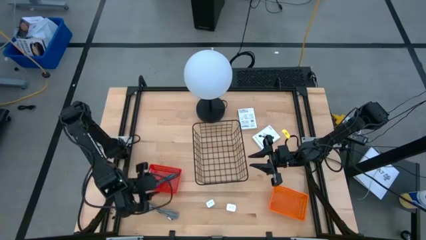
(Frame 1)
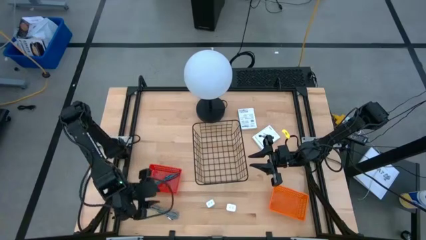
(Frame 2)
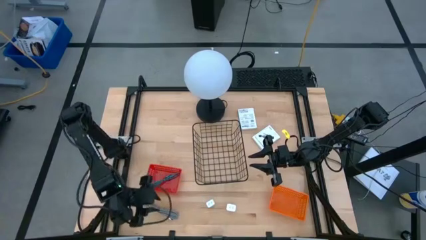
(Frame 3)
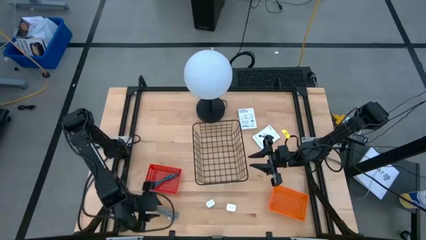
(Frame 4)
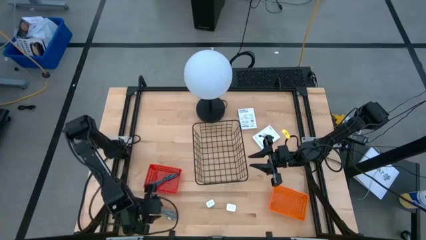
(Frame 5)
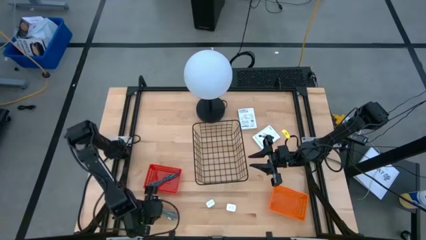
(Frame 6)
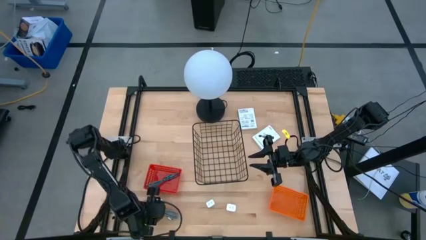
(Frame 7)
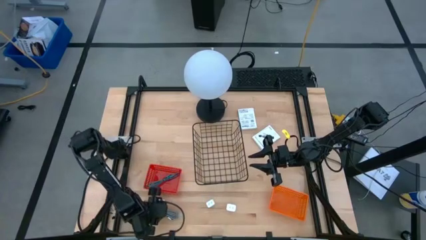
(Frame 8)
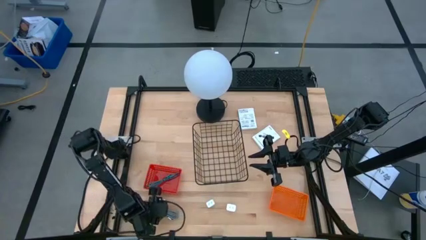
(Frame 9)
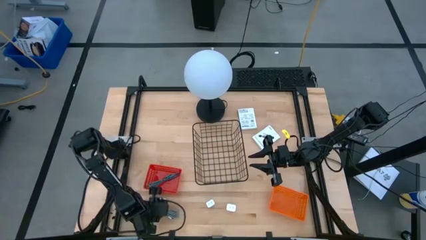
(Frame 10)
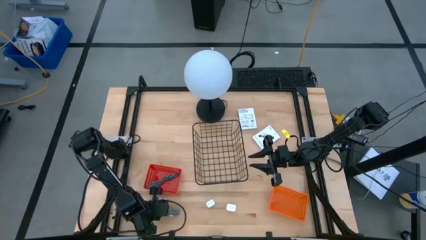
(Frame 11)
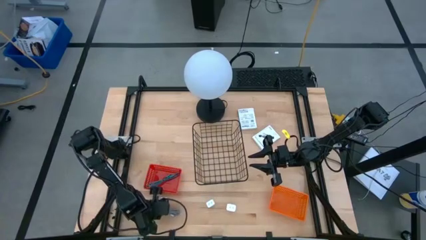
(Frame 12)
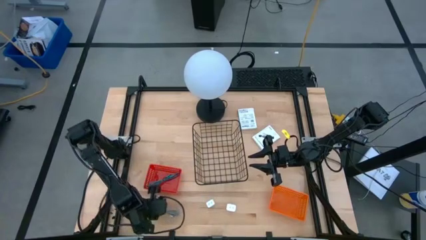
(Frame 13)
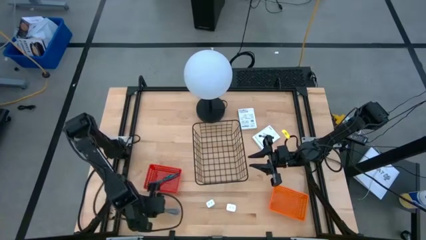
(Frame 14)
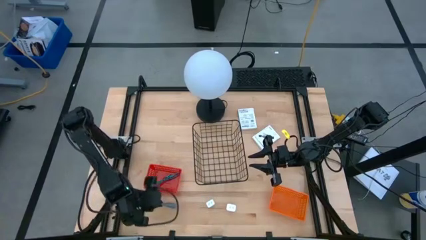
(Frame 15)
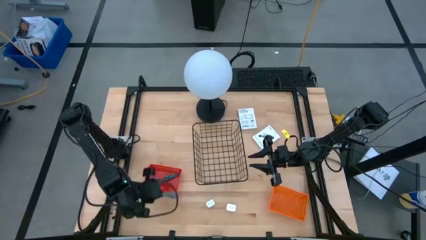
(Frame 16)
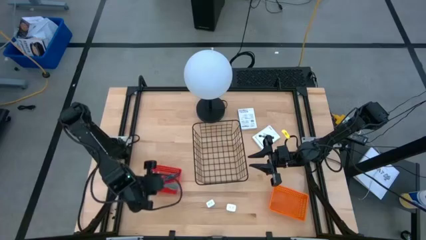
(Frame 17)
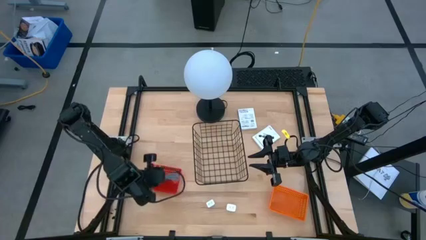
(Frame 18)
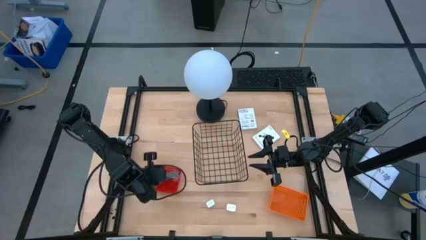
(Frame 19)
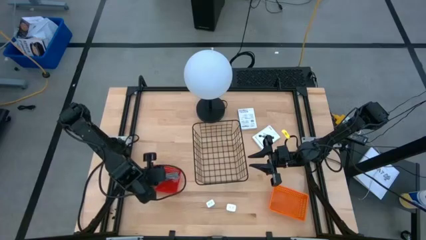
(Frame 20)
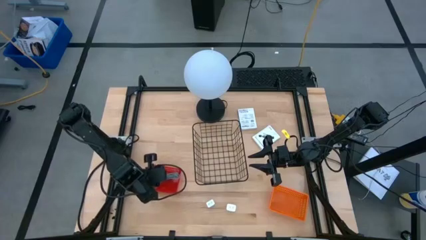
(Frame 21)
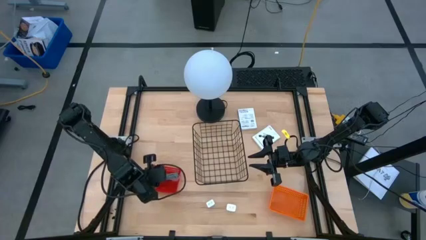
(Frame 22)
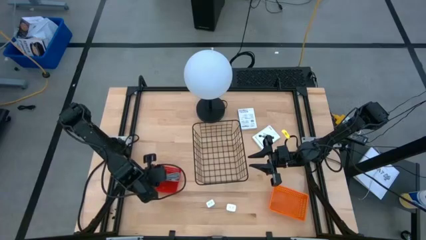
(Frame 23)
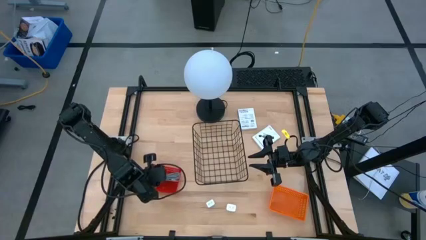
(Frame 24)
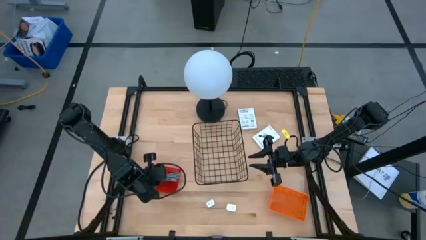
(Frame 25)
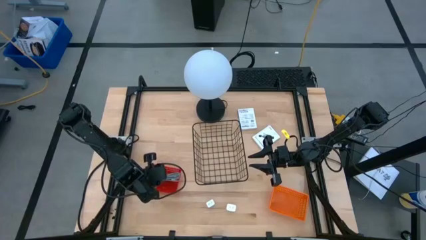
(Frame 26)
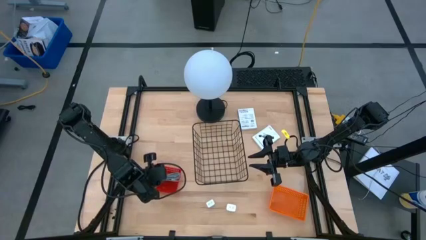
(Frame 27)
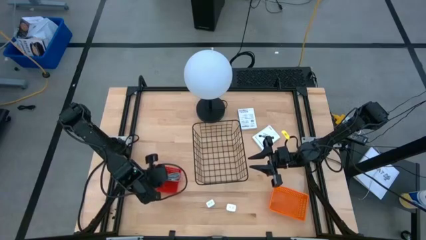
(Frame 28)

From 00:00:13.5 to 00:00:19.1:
Task: Pick and place items into bin
Put the white USB cable wire into the red bin

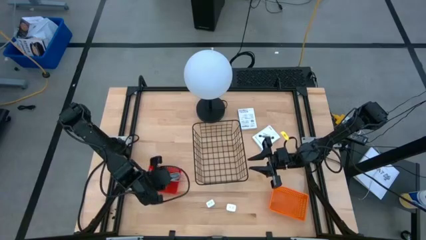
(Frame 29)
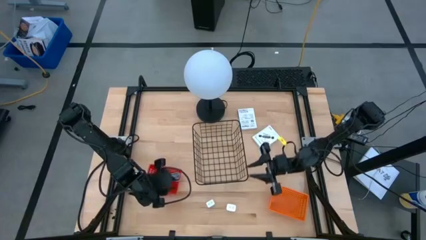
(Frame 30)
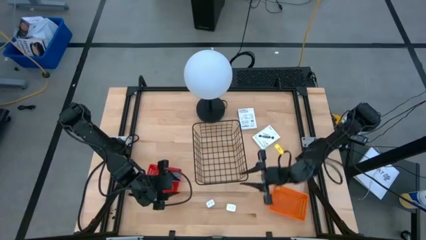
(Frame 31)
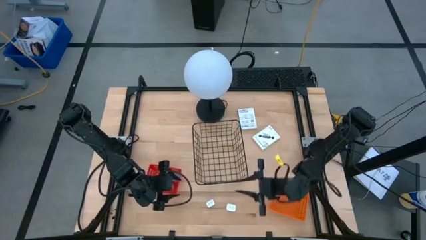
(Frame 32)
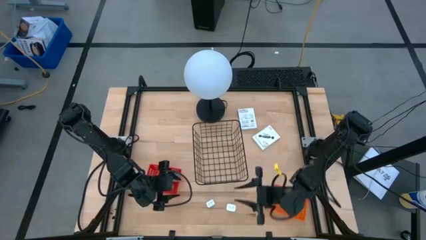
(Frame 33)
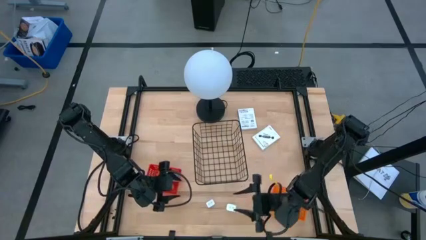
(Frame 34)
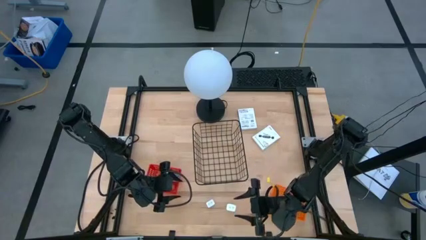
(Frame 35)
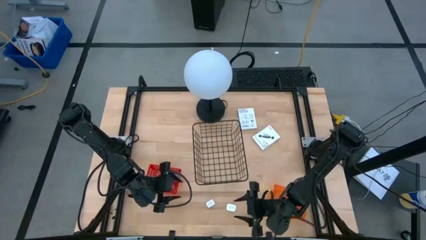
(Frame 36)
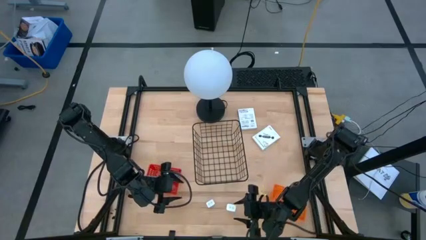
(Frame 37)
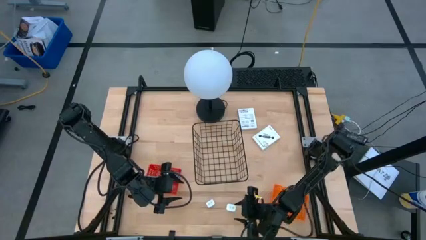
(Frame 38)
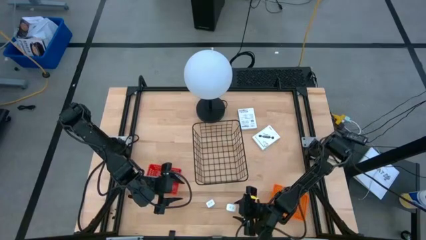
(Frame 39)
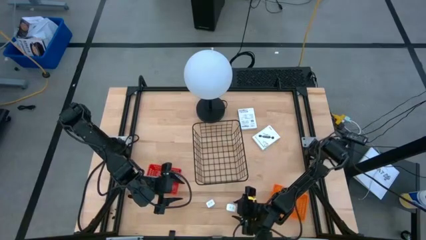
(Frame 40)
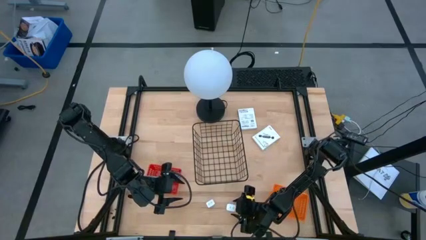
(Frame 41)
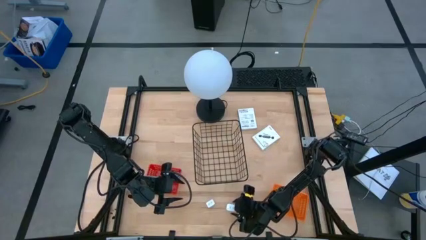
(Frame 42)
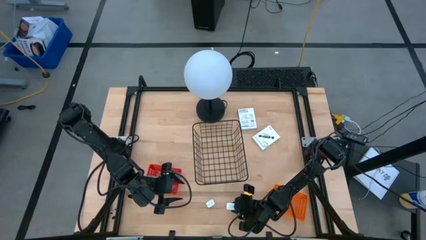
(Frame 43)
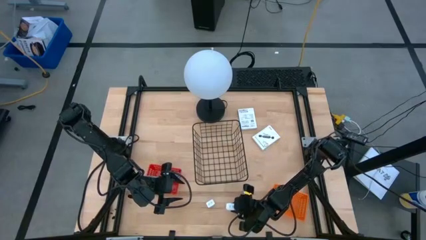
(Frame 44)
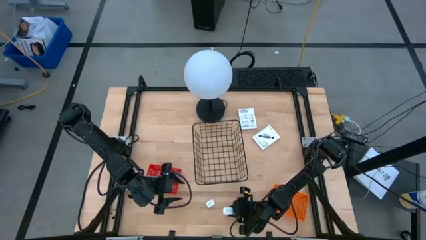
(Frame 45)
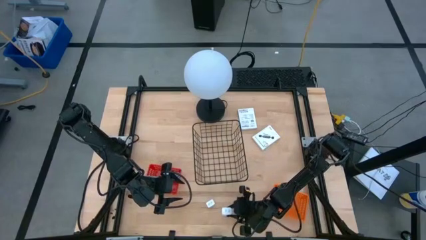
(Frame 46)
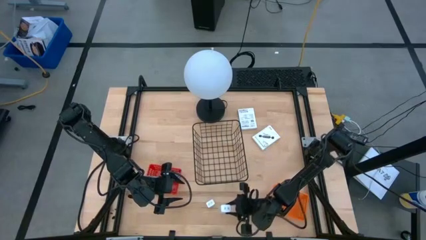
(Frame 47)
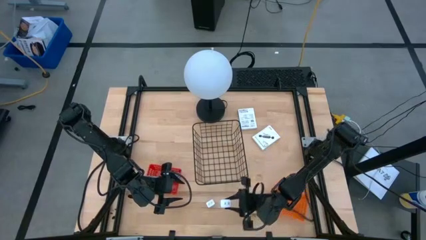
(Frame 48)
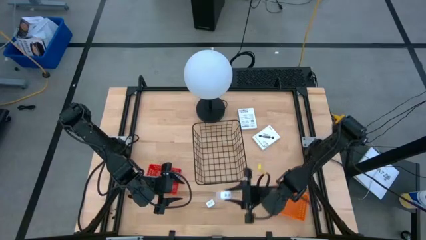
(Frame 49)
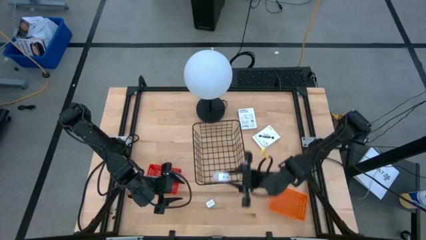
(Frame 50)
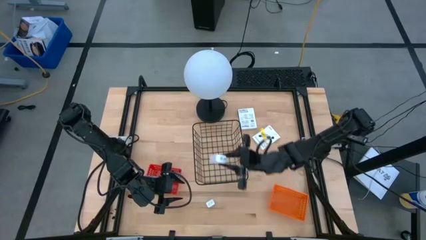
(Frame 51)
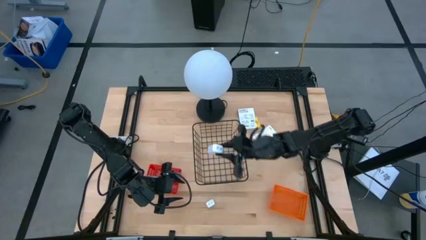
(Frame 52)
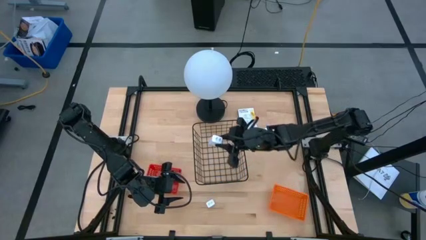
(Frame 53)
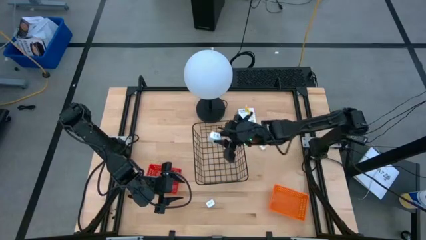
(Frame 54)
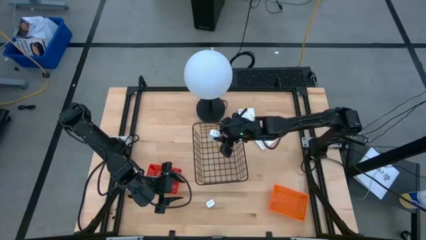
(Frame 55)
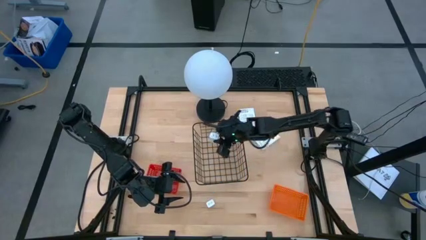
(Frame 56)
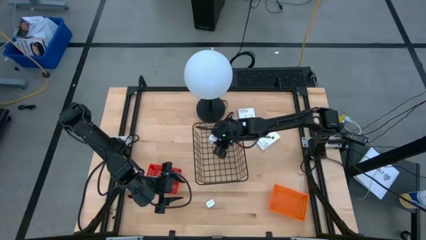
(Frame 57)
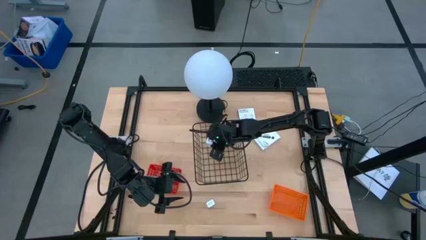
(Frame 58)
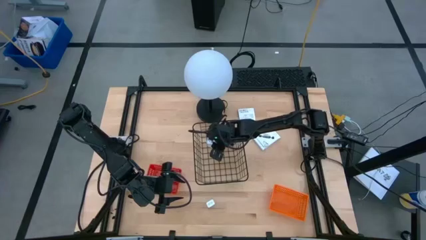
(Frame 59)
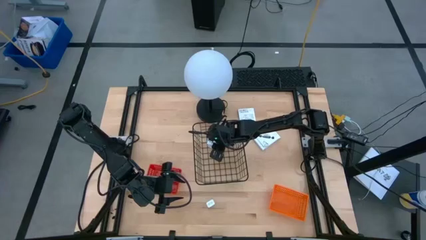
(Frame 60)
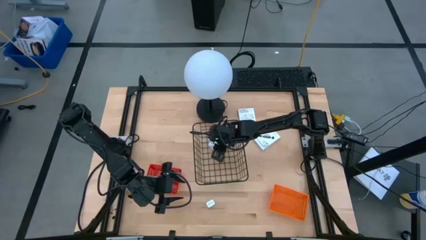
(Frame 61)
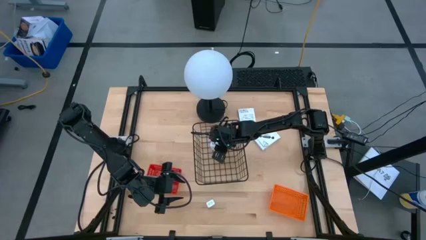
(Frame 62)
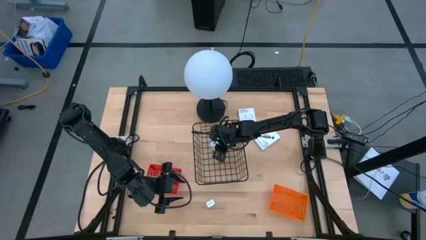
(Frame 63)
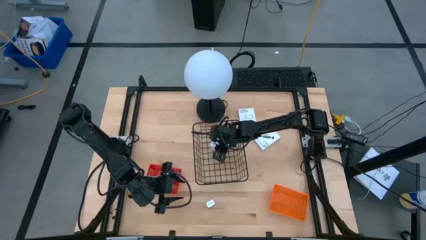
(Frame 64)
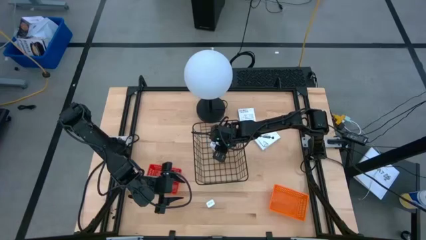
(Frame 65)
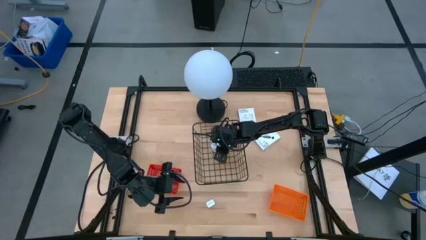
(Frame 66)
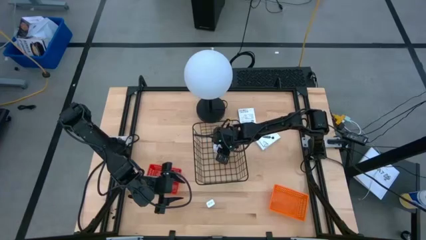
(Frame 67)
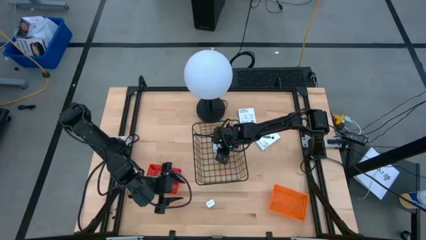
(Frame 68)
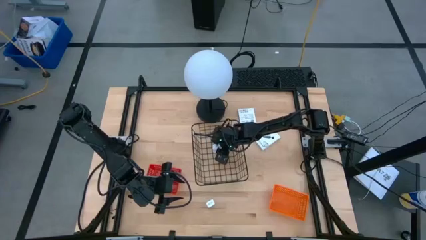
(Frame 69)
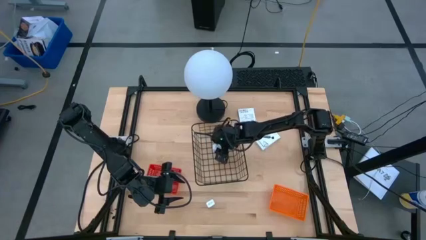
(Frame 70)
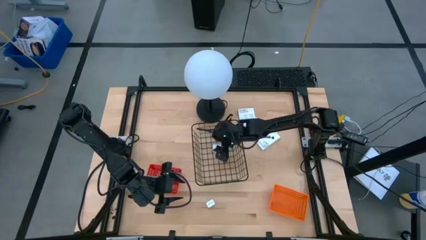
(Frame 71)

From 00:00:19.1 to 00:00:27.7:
Put the right charger adapter into the wire basket

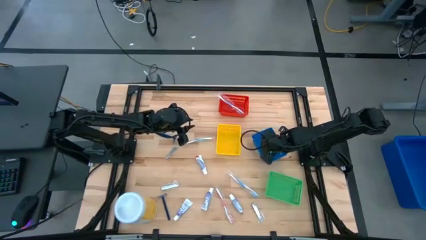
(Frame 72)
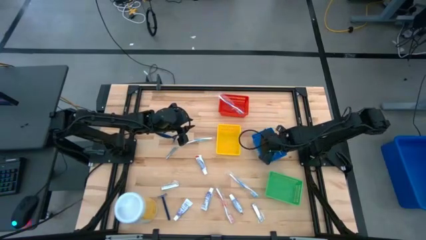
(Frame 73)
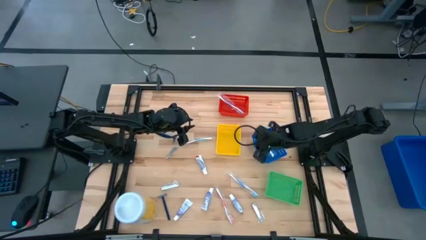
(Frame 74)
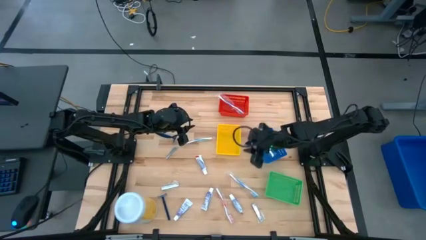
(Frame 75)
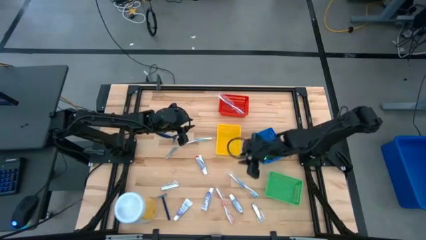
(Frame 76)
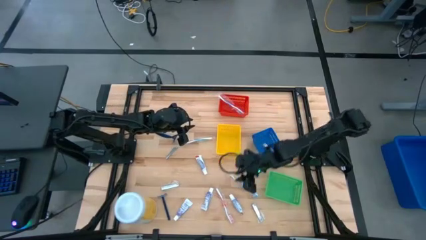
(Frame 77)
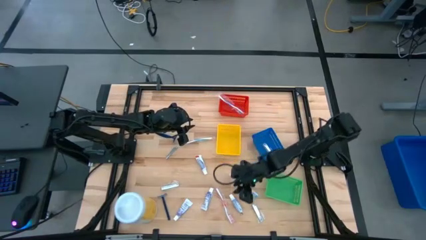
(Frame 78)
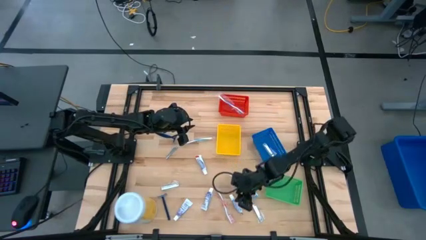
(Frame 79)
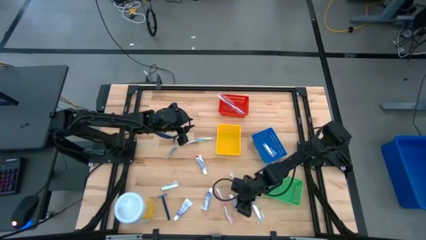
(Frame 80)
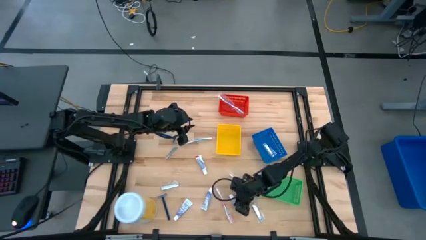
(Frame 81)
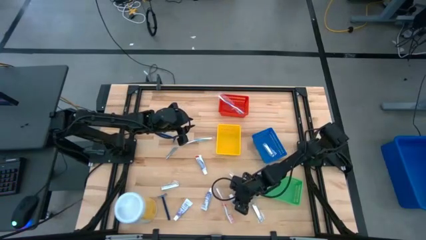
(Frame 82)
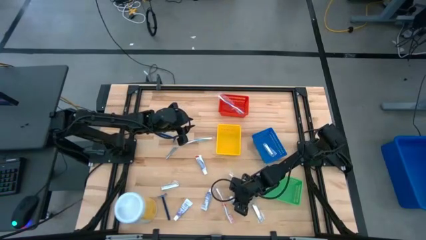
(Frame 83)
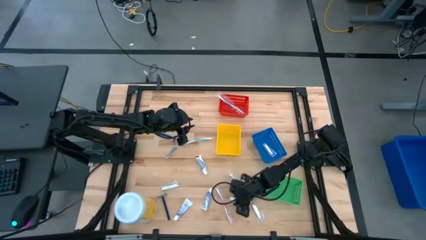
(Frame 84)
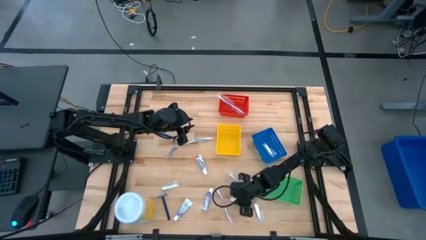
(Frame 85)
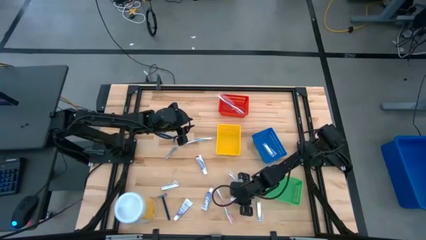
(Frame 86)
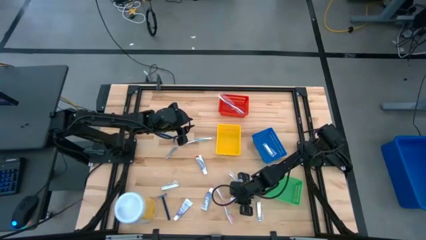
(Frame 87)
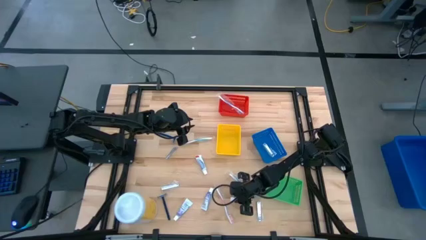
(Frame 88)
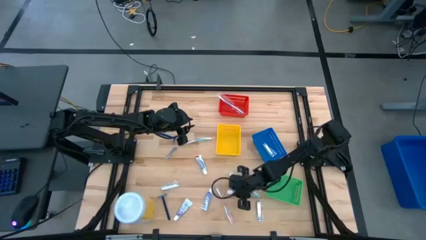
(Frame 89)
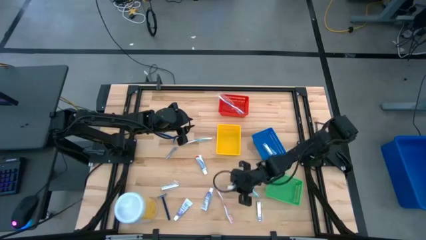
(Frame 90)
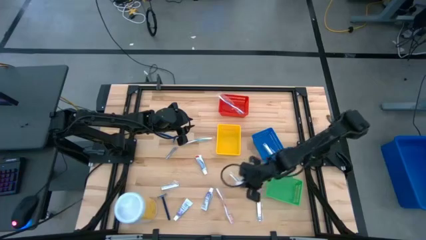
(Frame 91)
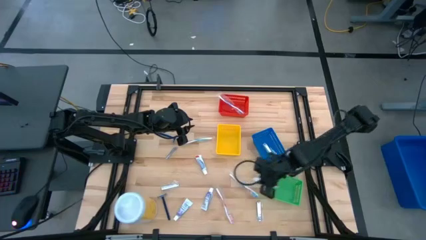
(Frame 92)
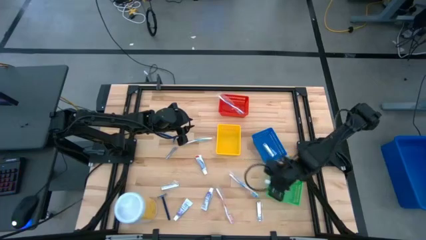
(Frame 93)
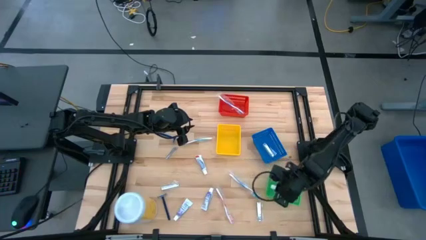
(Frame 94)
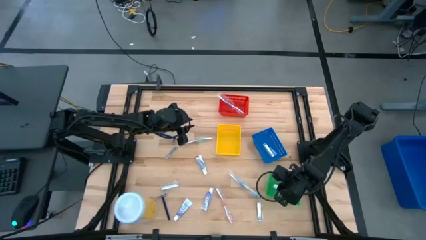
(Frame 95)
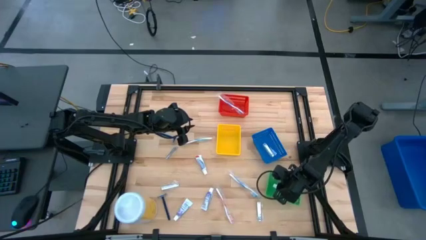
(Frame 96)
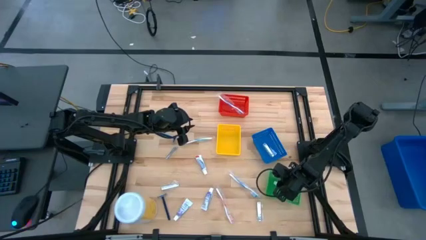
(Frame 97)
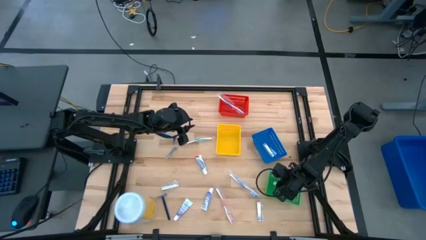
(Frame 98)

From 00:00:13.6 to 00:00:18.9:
Task: Pick & Place Travel size toiletries
Put the toothpaste into the green bin
